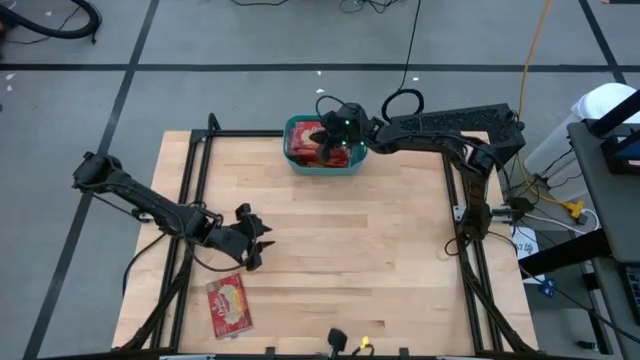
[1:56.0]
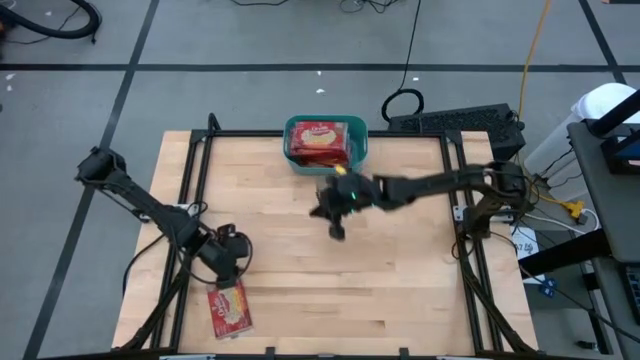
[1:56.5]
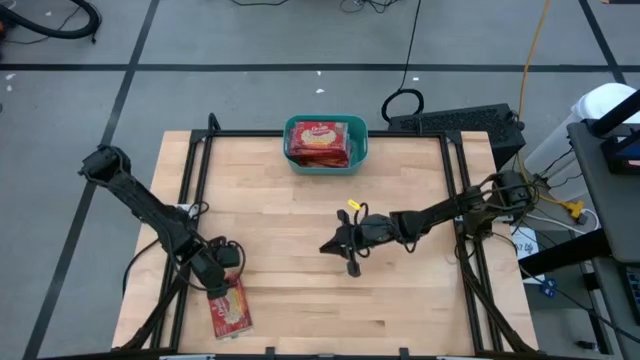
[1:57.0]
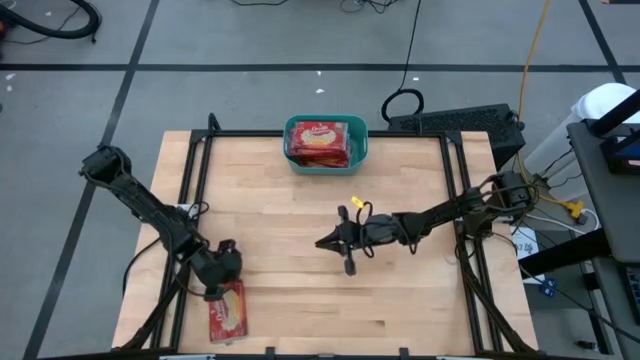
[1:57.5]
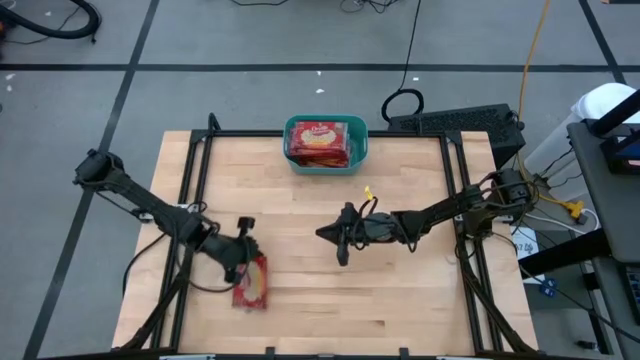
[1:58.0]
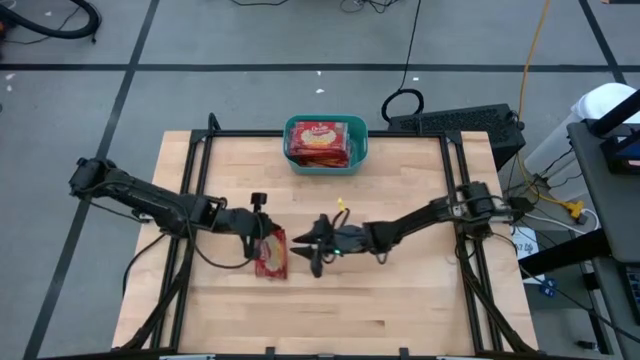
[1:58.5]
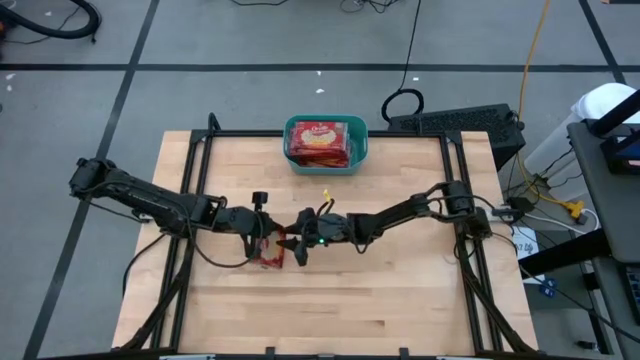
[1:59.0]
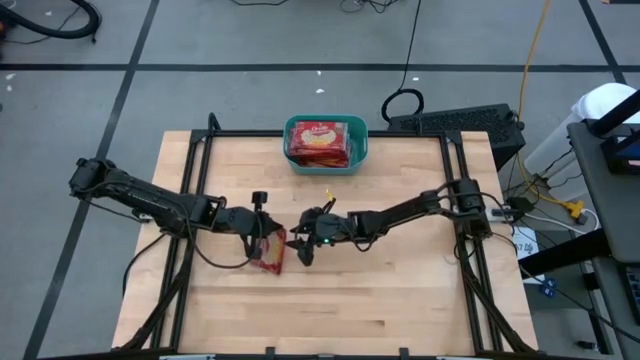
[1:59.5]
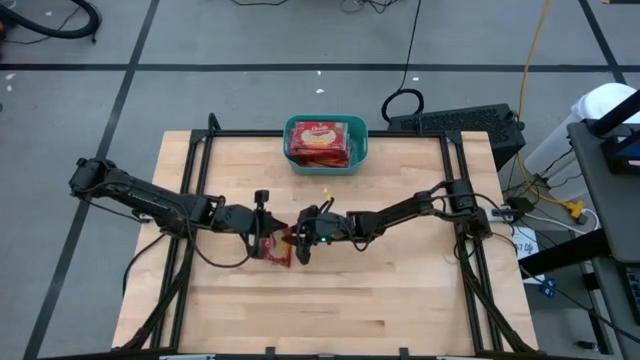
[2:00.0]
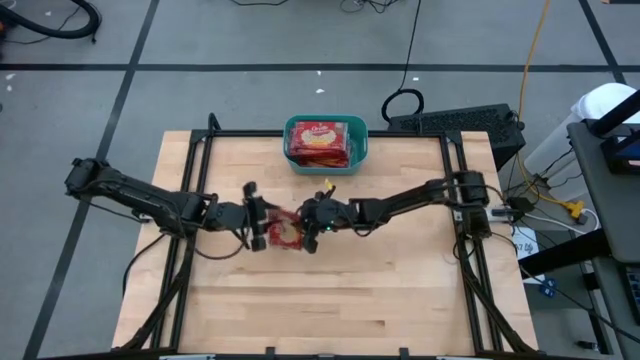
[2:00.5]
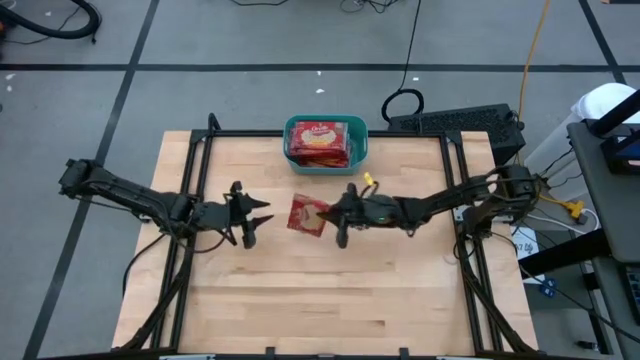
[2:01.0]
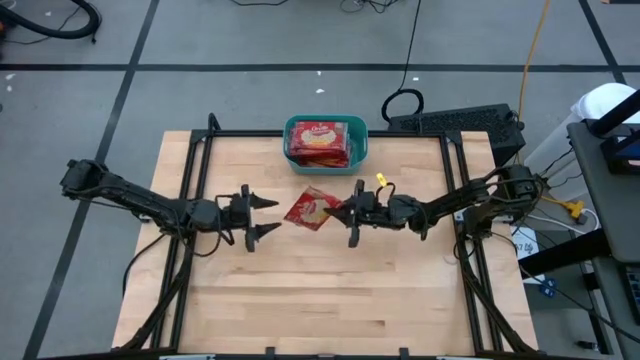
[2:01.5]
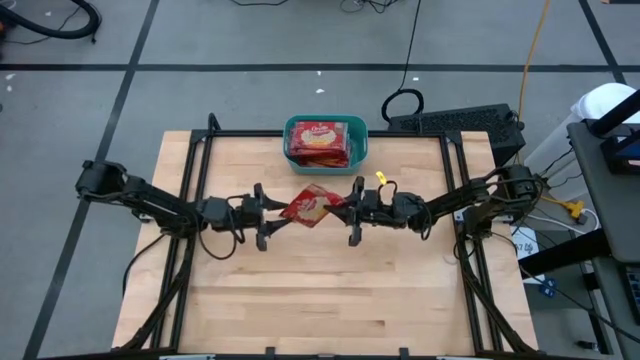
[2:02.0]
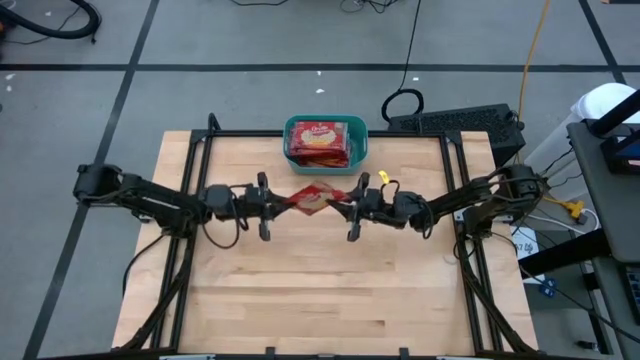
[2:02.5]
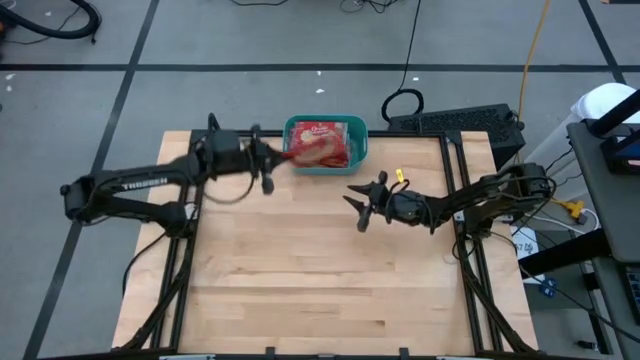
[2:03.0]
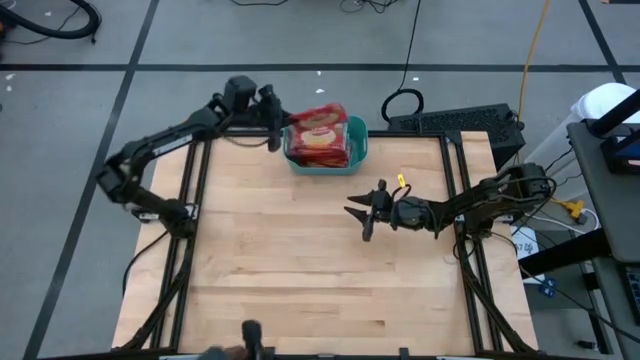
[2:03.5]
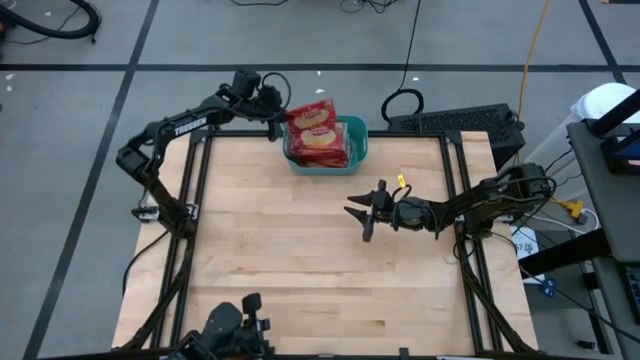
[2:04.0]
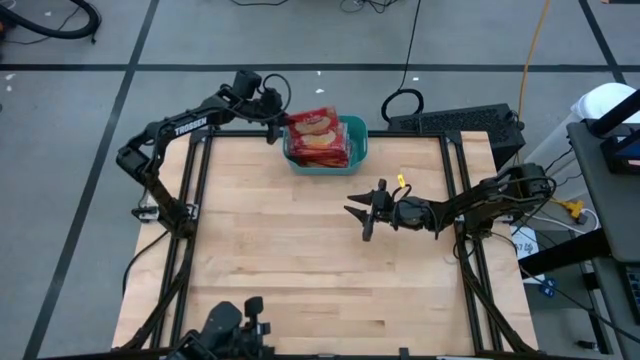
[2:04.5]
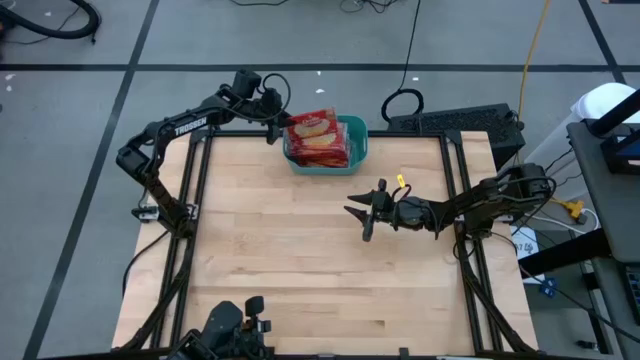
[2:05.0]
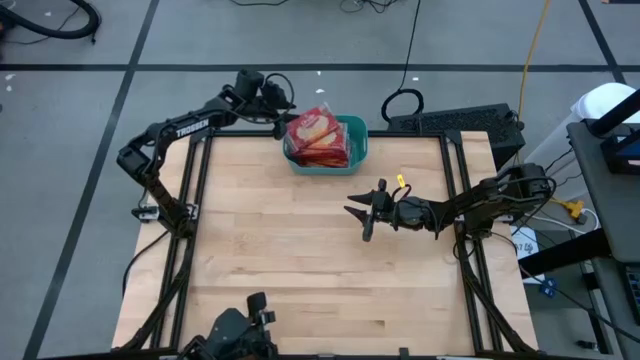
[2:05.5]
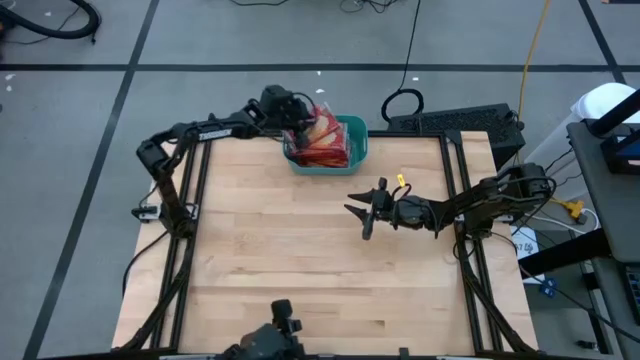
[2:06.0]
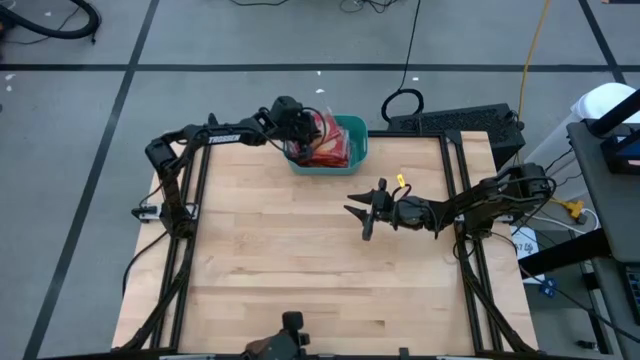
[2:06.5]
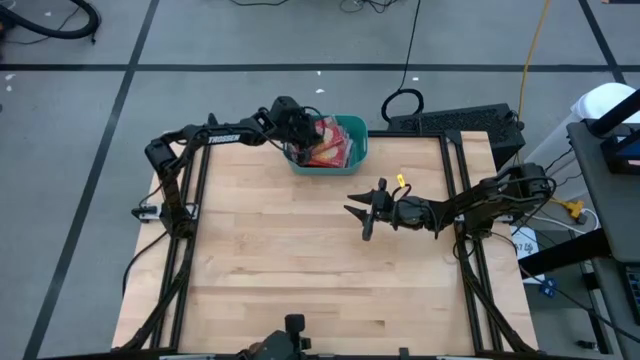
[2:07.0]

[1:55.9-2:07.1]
Task: Sort popcorn bags into baskets
Put the red popcorn bag into the green bin

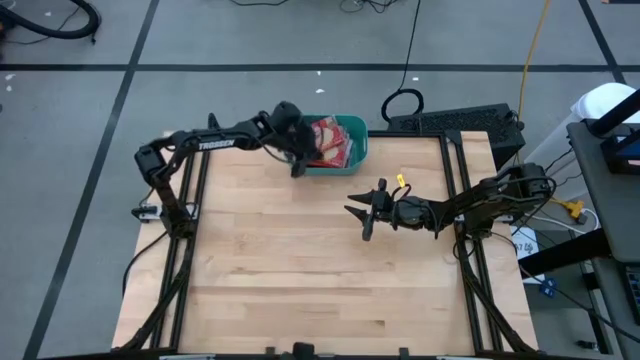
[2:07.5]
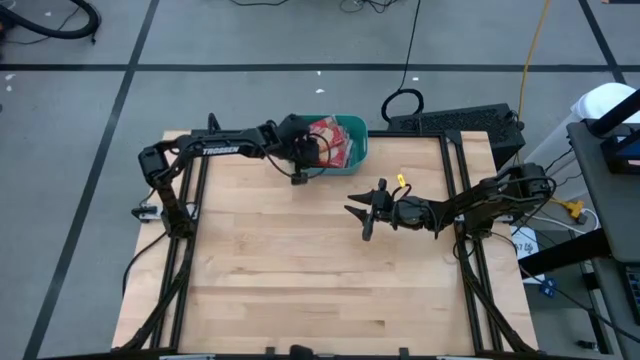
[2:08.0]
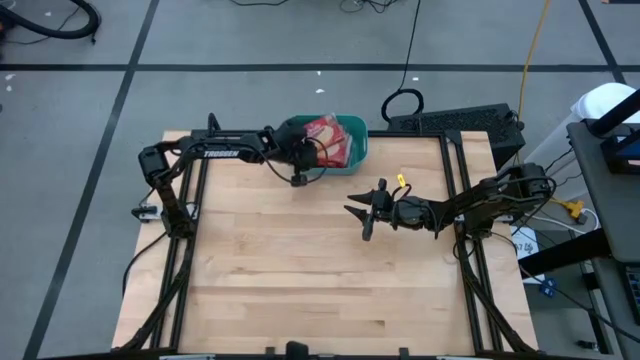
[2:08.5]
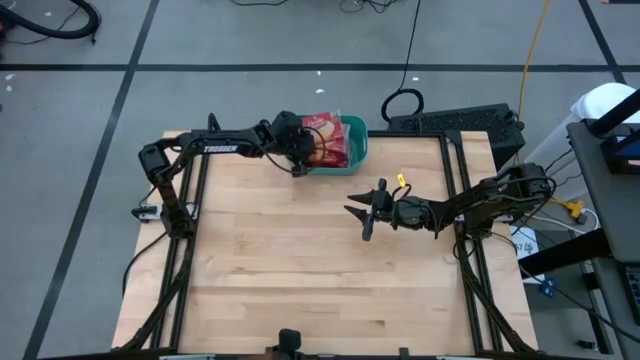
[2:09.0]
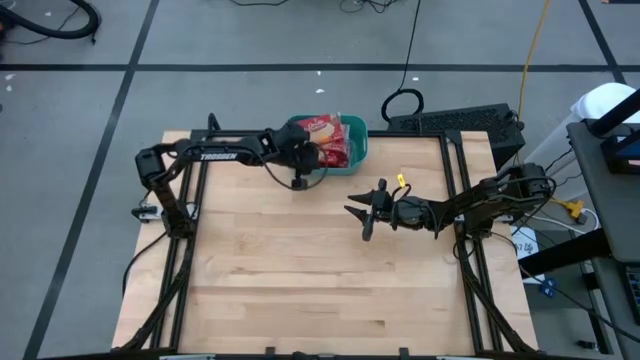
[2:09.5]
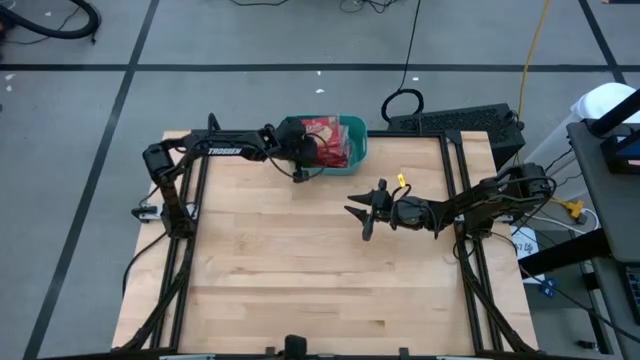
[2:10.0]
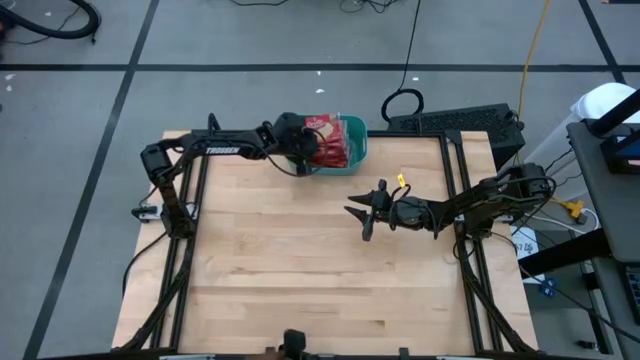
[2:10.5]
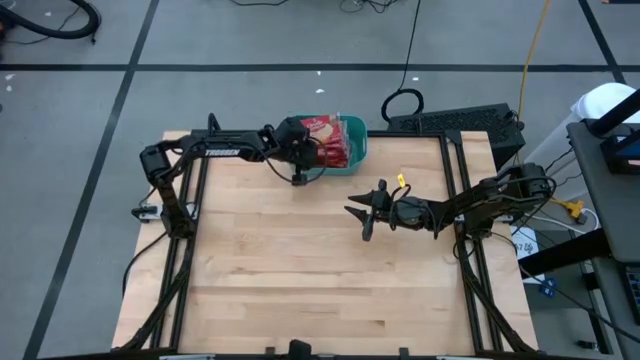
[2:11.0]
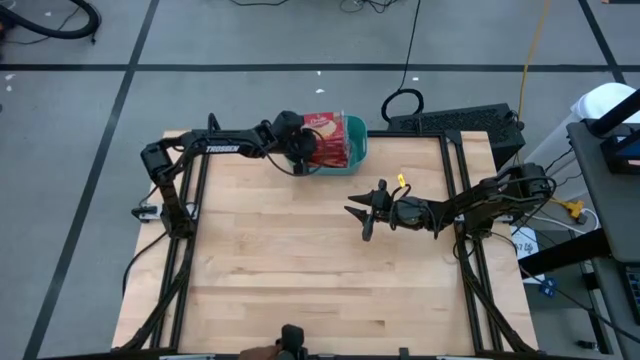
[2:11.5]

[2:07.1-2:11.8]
Adjust the red popcorn bags in the green bin

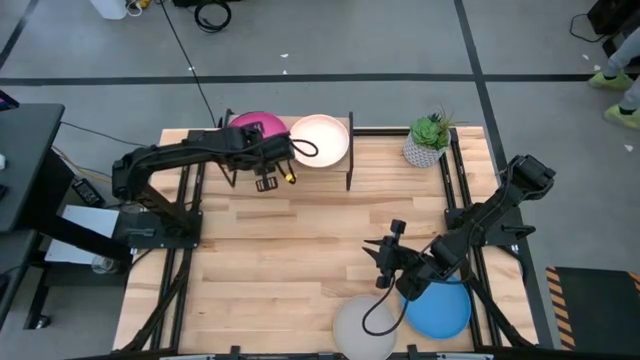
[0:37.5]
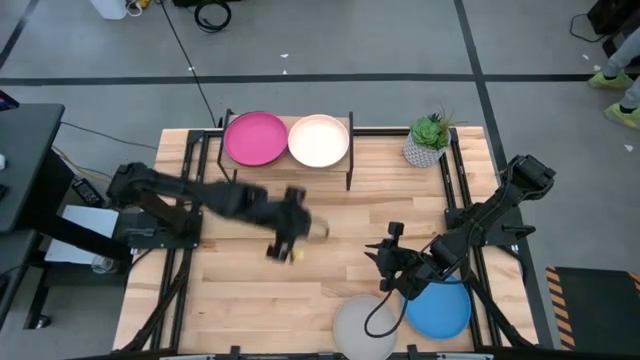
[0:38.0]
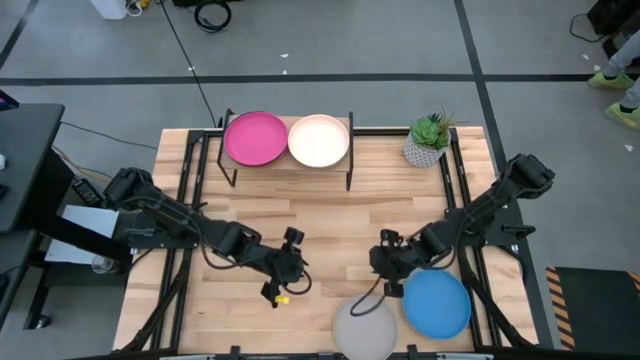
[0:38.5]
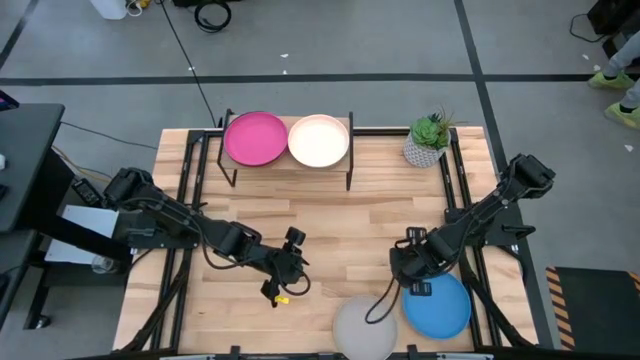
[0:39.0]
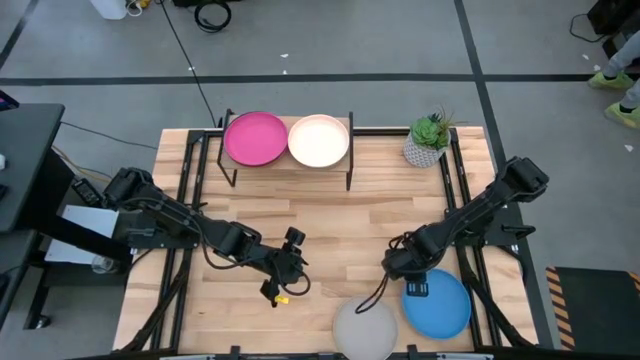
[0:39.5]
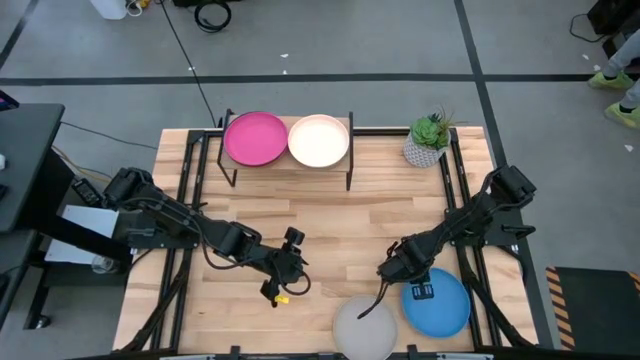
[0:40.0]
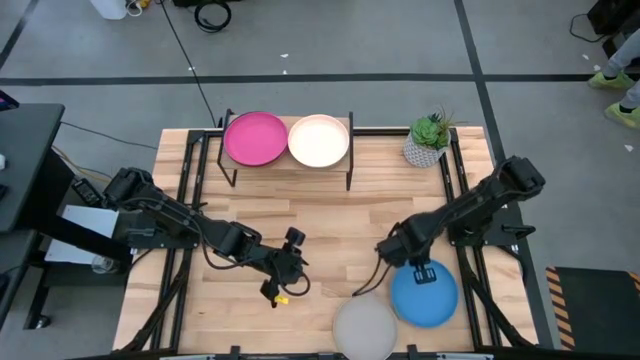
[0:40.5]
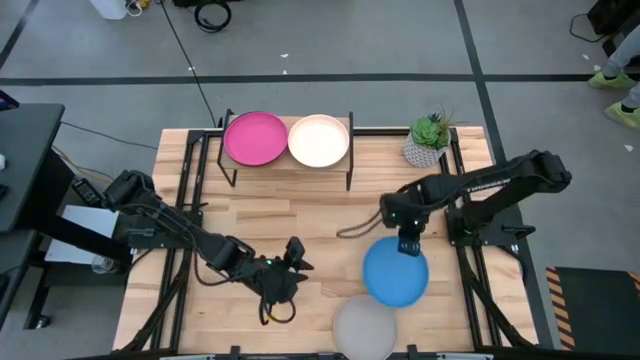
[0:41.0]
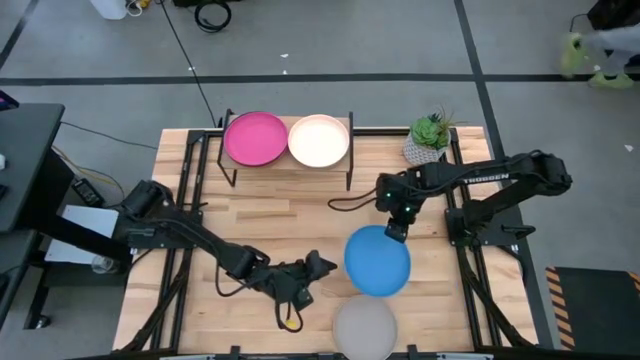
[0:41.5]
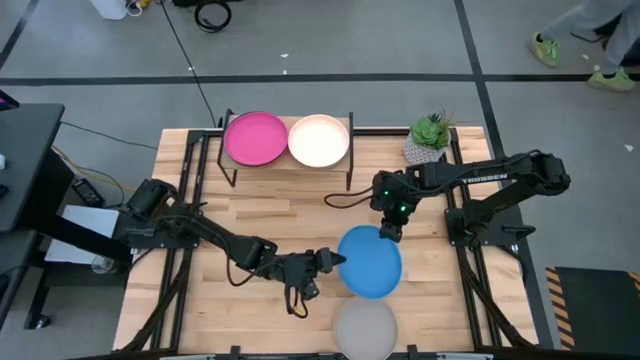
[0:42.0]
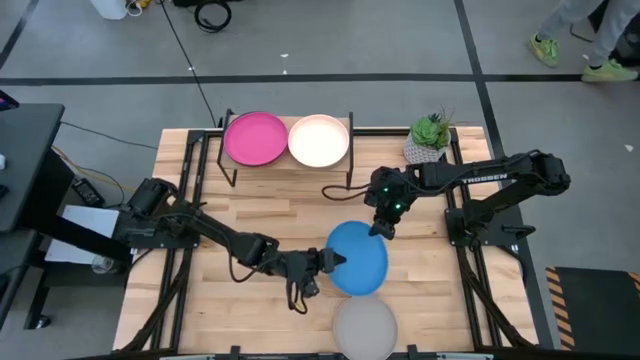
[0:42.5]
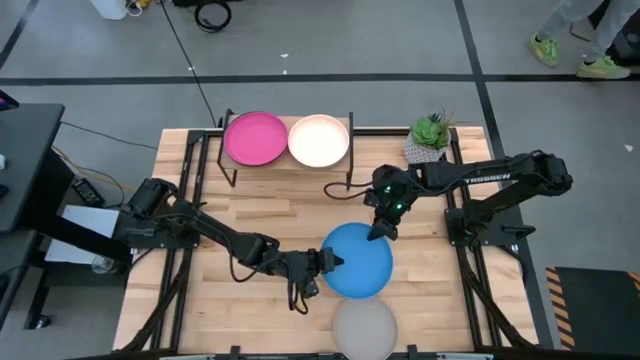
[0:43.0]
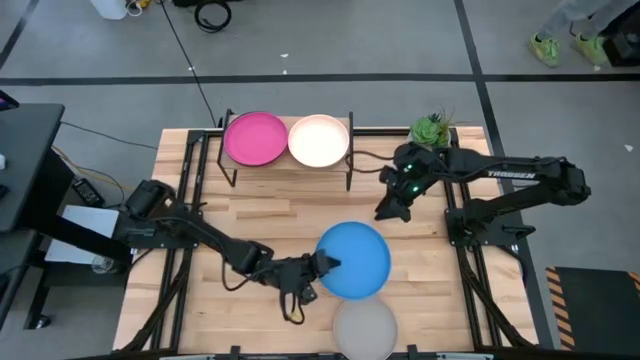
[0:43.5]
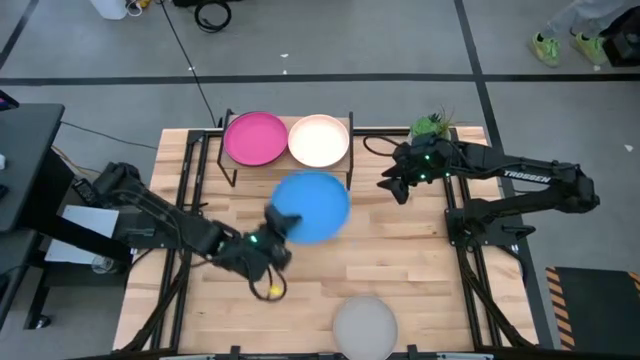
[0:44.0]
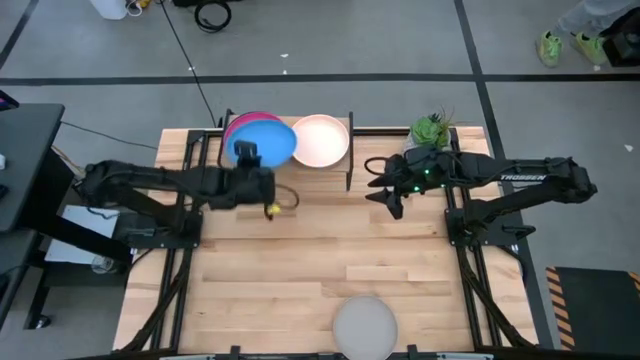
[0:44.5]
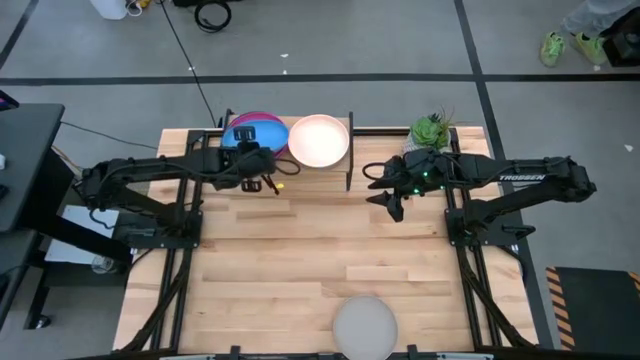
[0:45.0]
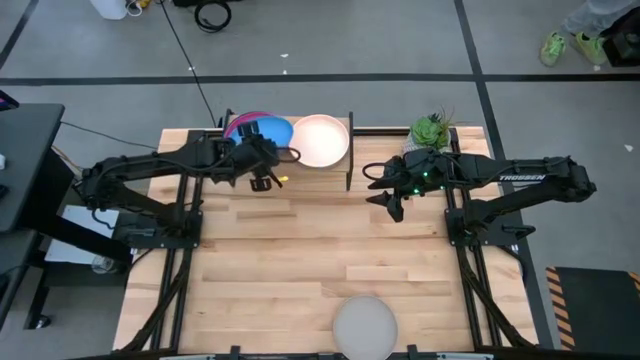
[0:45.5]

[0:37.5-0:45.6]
Task: Place and stack plates onto a shelf
Stack the blue plate on top of the pink plate on the shelf
